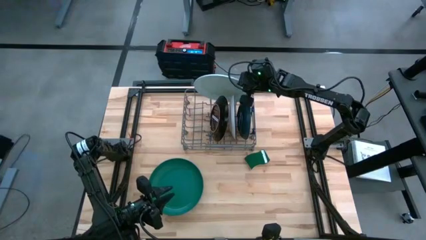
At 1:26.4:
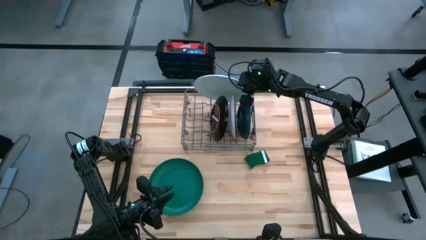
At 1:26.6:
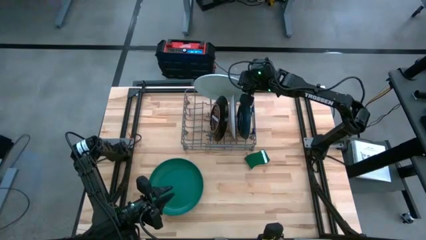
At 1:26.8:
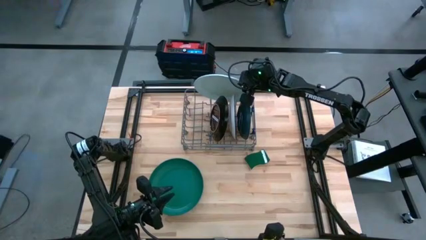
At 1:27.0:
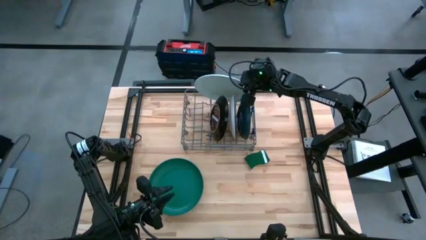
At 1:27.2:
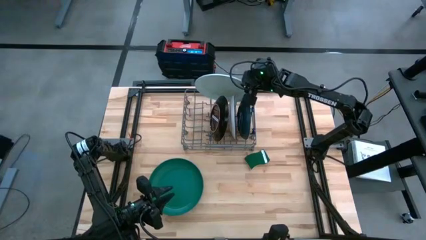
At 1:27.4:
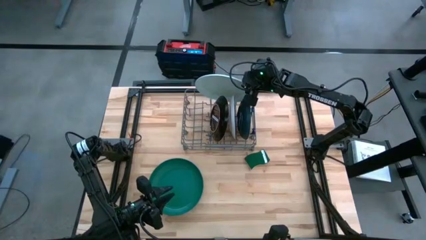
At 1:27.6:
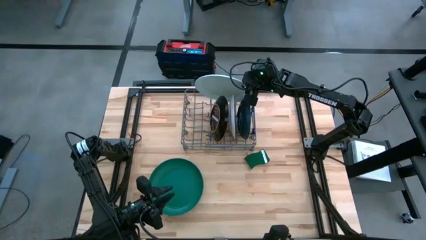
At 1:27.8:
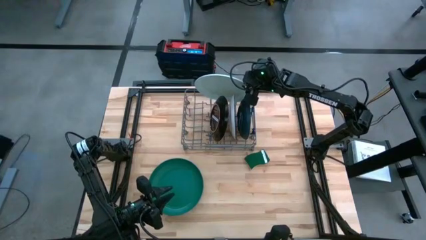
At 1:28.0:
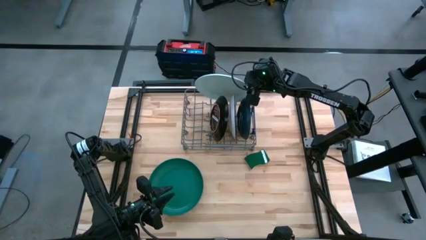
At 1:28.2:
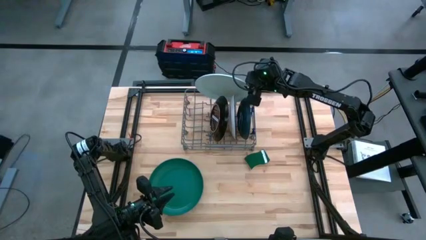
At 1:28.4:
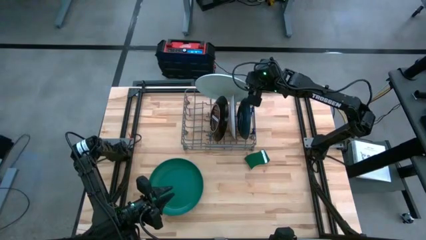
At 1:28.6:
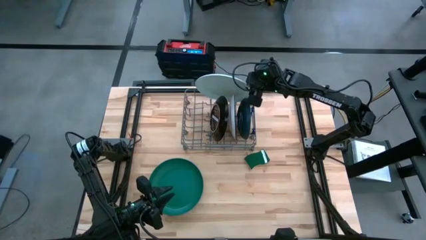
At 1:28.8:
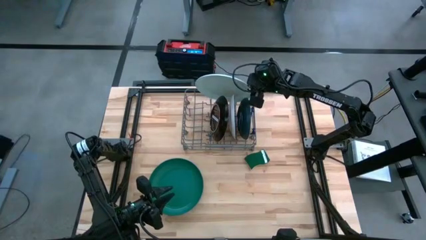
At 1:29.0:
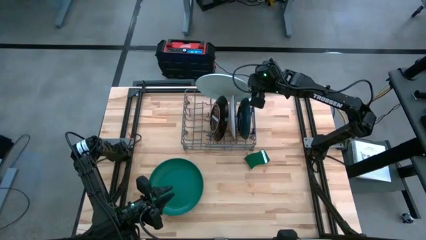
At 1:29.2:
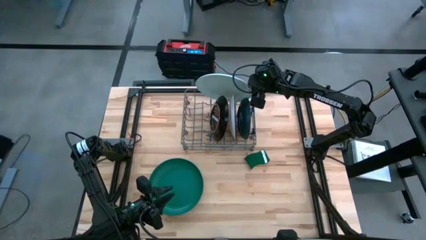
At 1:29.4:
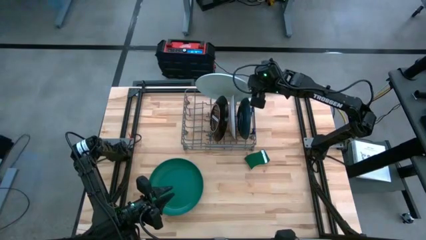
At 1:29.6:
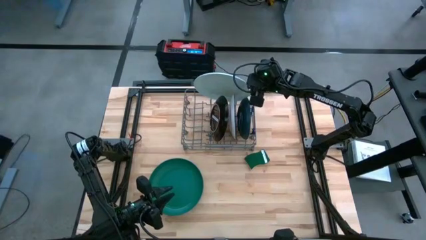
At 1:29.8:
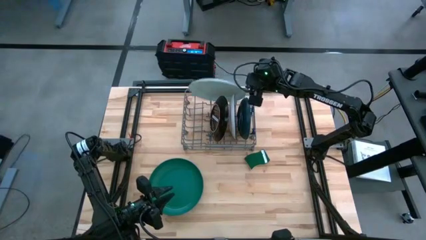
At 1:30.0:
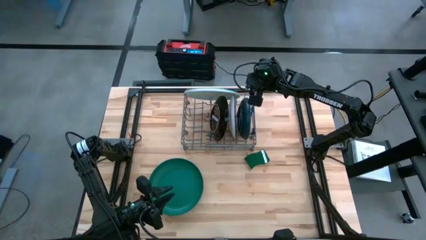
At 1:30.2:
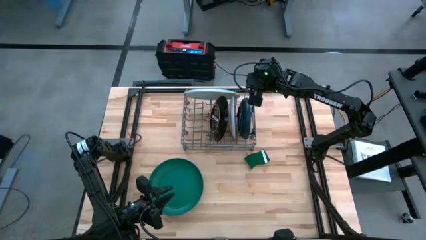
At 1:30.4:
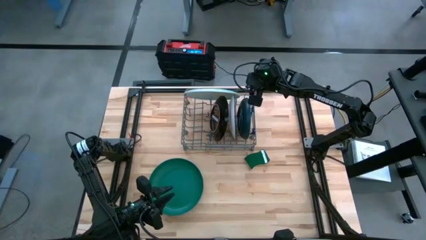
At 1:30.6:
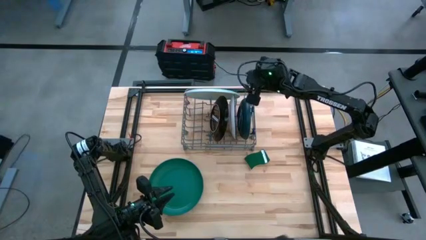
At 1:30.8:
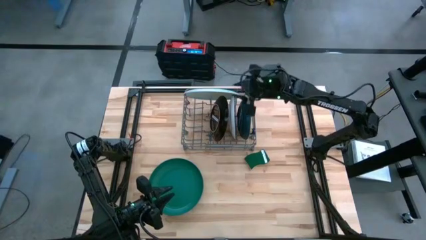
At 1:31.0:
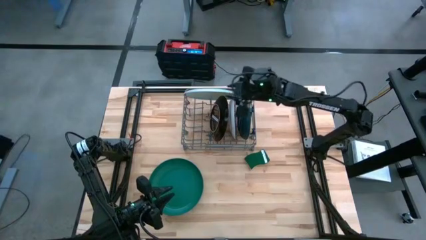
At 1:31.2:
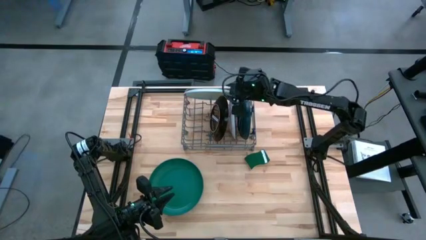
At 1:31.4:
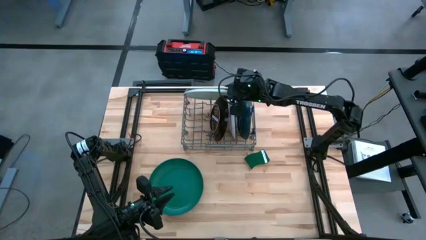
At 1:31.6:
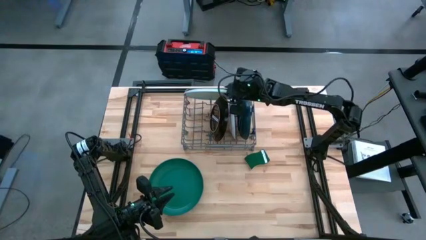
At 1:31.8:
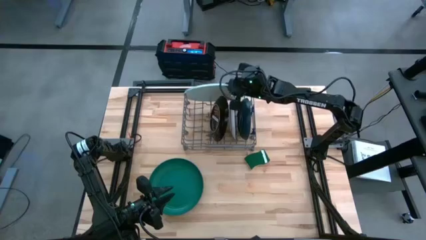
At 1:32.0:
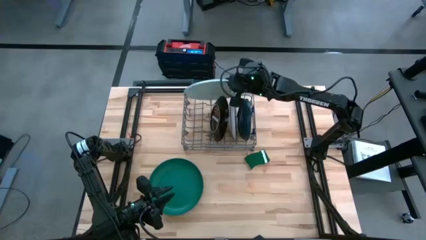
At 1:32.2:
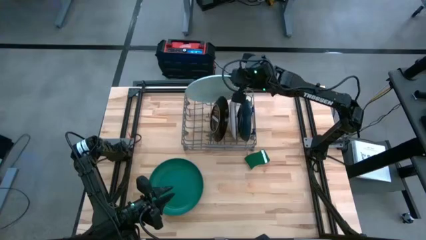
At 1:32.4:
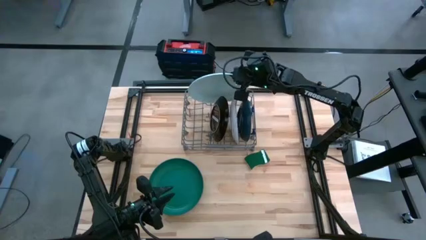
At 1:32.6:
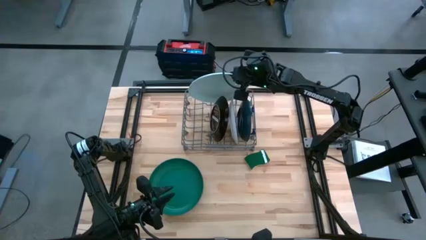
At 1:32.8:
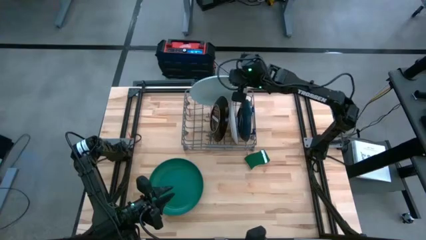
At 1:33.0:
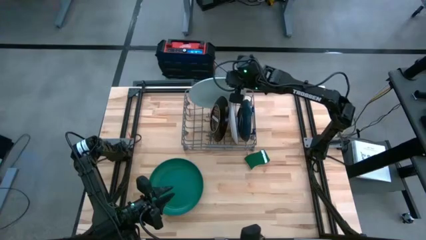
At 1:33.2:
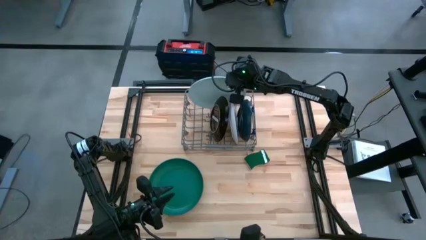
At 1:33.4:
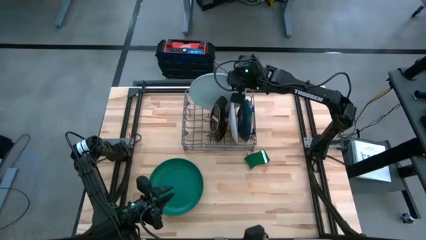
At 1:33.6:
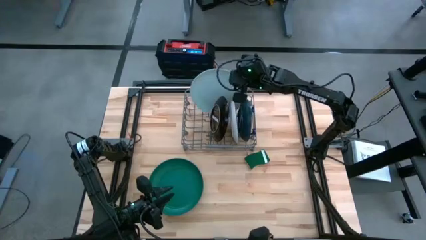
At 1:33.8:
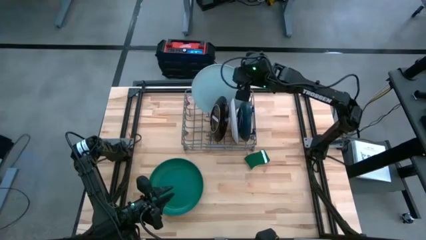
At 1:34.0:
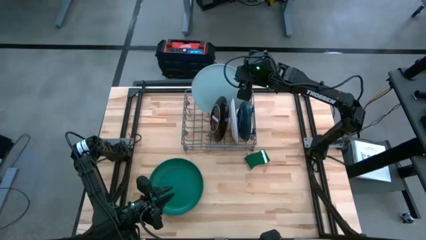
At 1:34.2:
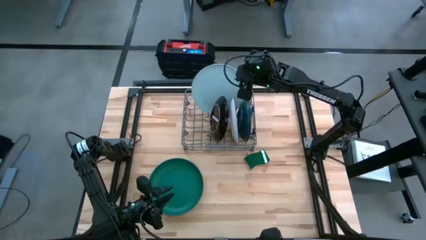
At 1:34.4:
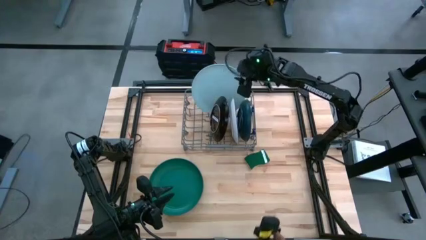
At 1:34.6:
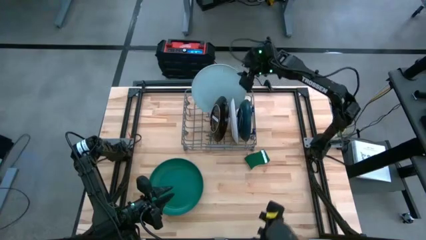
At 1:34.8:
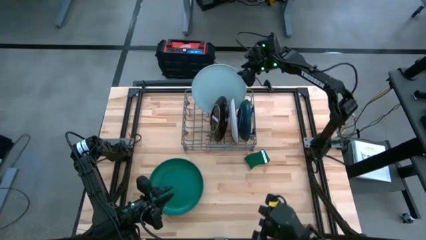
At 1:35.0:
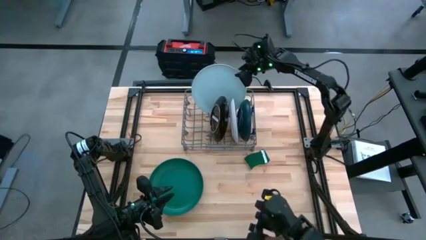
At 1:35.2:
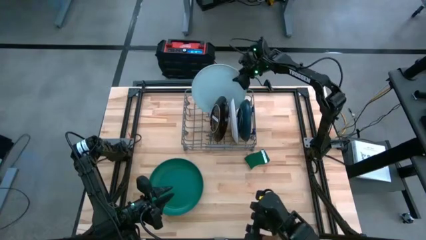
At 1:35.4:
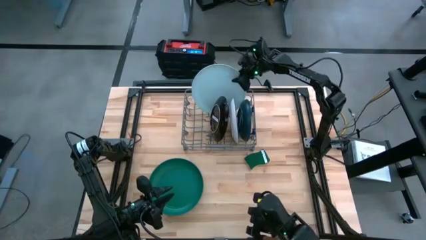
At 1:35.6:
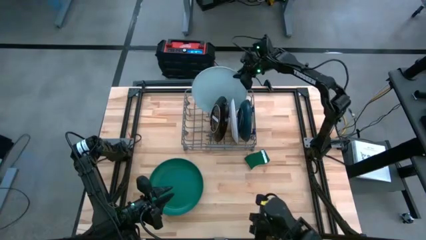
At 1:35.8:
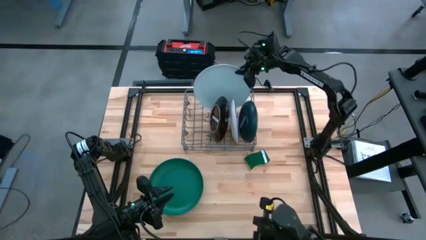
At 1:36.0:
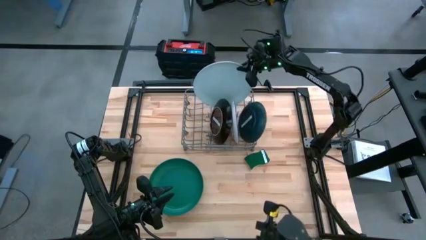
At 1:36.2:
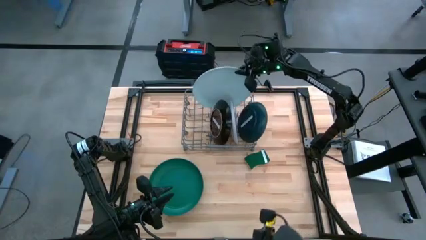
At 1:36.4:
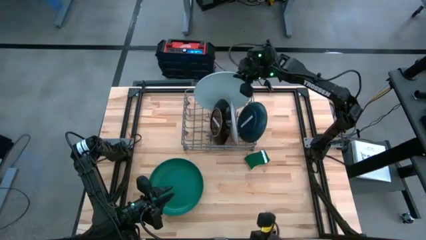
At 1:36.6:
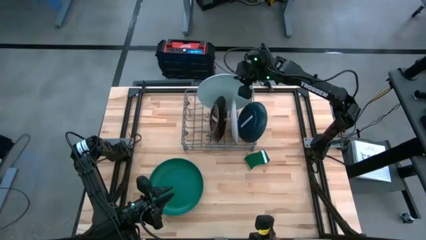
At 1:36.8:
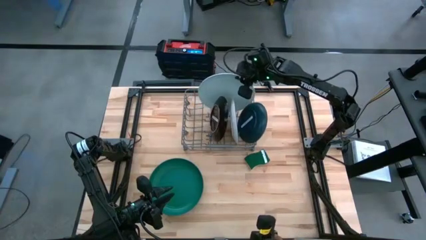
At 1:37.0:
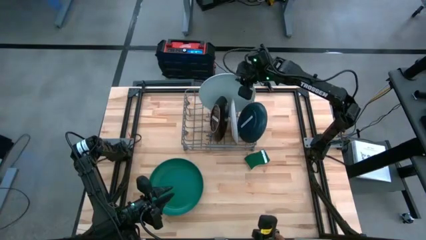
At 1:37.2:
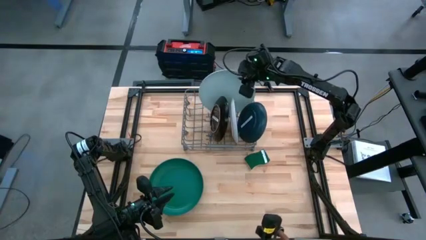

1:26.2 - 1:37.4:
Task: Sort dishes
Put the white plate into the dish rack

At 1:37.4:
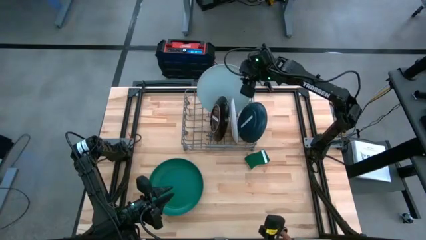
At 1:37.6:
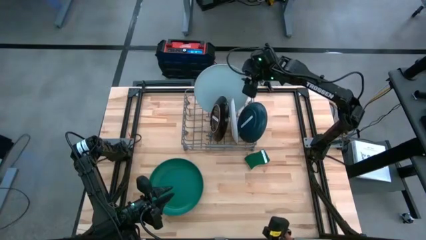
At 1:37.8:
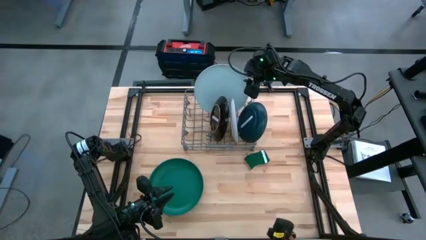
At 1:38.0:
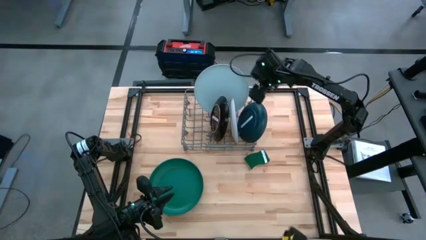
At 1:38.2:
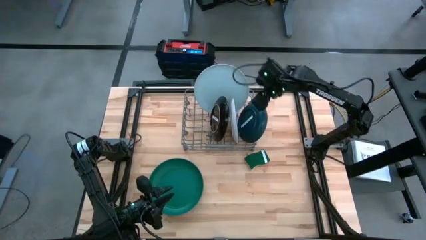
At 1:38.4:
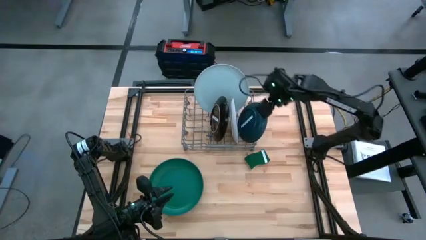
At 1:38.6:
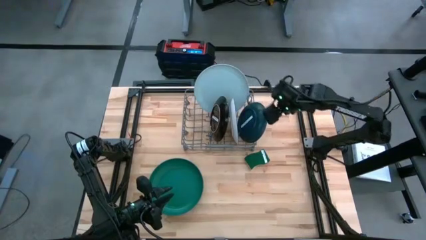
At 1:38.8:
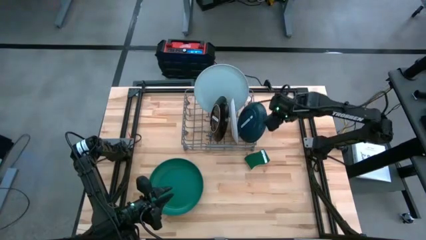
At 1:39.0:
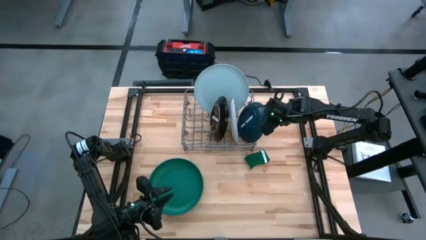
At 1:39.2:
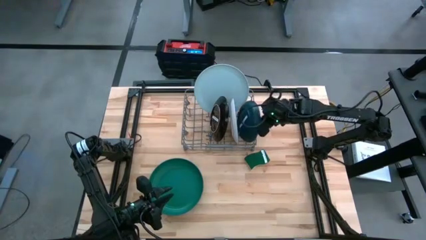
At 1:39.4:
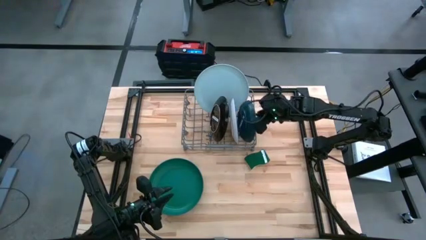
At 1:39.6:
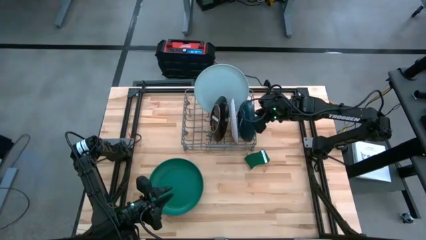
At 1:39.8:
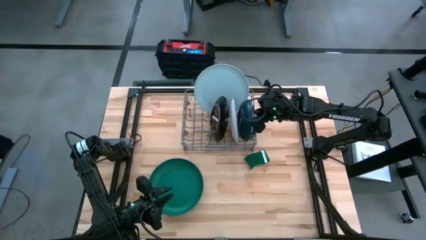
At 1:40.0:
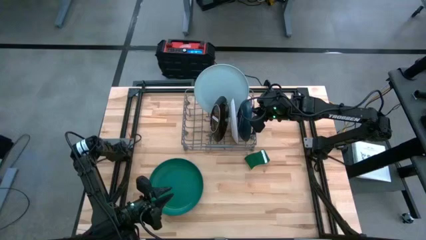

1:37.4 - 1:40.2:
Adjust the dark green plate in the dish rack

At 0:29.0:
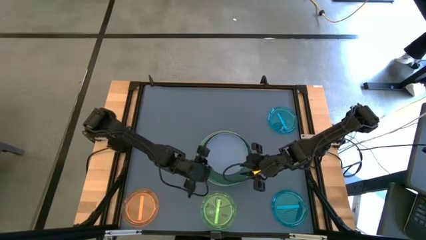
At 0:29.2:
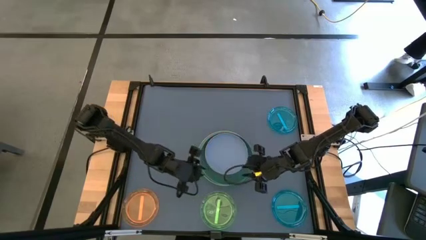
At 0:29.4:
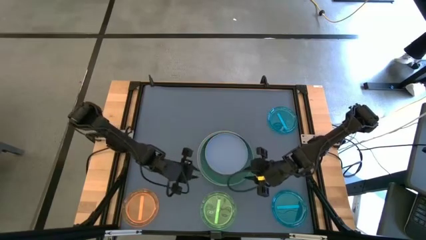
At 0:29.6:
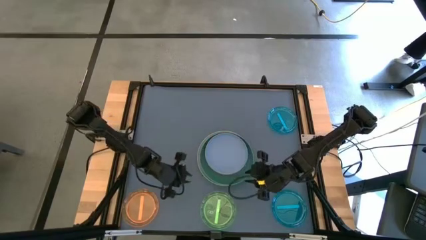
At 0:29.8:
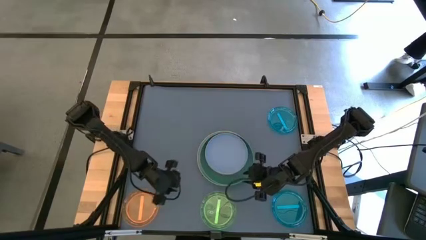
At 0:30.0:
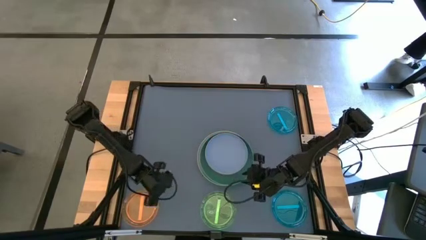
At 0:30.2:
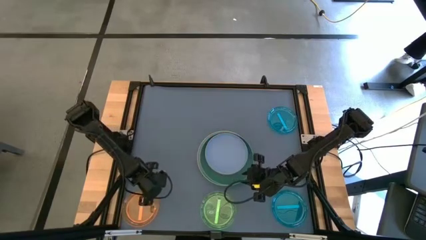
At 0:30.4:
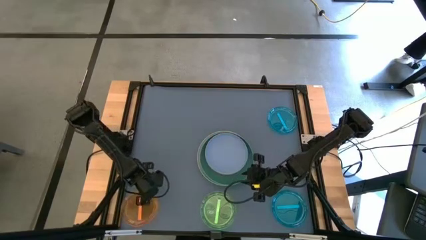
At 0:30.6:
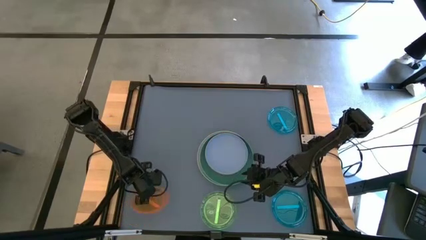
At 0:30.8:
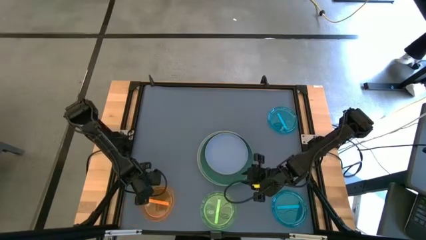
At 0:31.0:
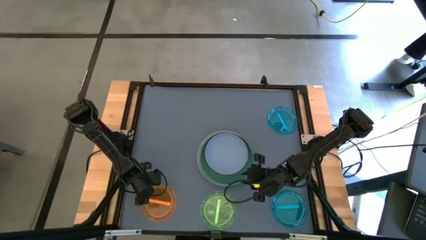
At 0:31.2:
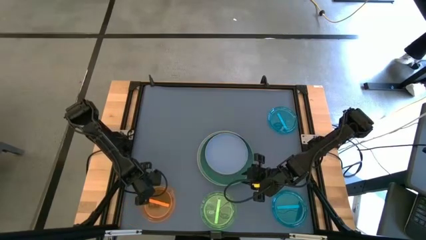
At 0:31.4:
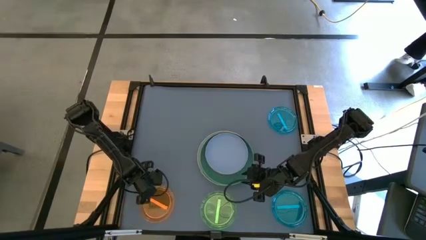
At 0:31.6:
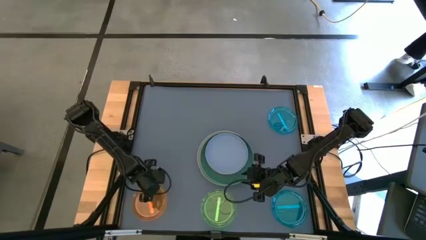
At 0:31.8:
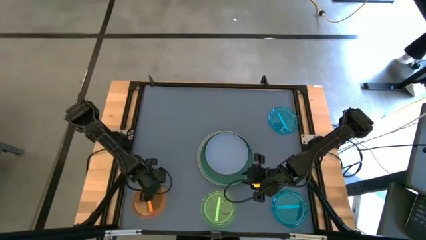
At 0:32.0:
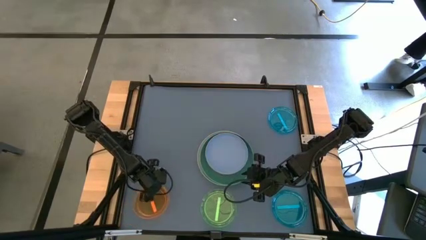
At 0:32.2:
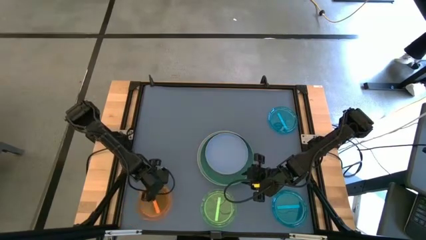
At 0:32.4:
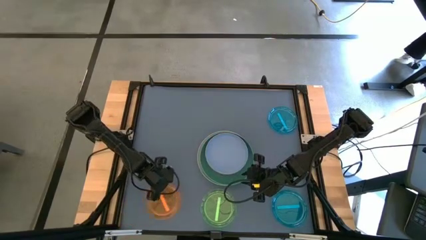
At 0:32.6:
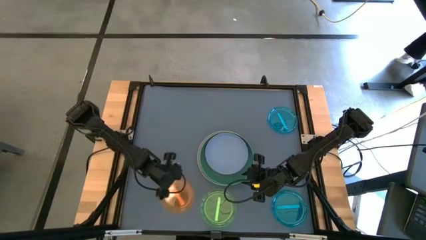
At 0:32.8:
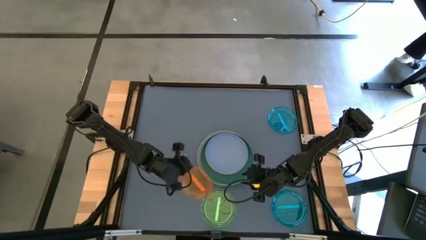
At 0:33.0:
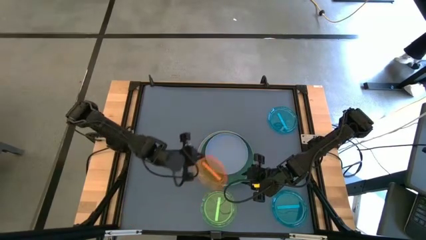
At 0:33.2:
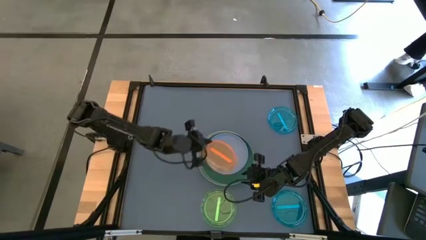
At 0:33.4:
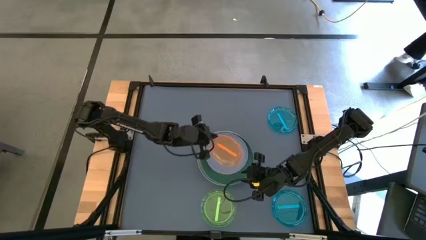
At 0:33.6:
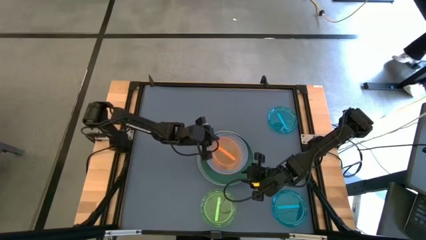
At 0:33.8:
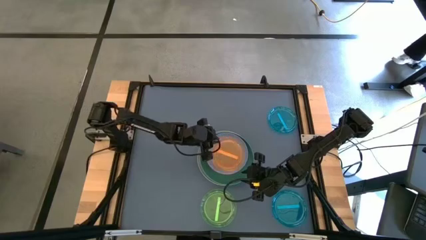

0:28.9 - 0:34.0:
Task: Stack plastic plates
Stack the orange plate on top of the blue plate
